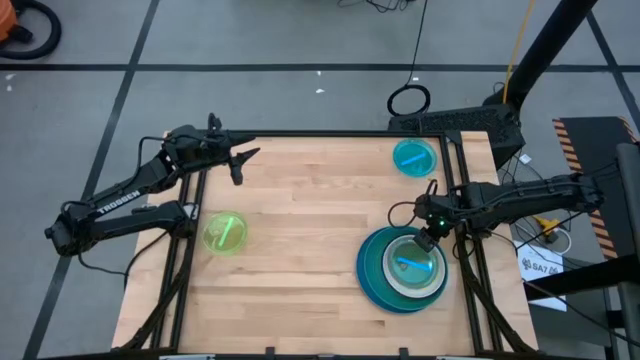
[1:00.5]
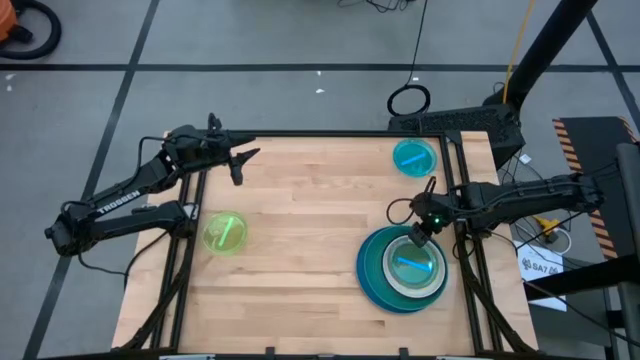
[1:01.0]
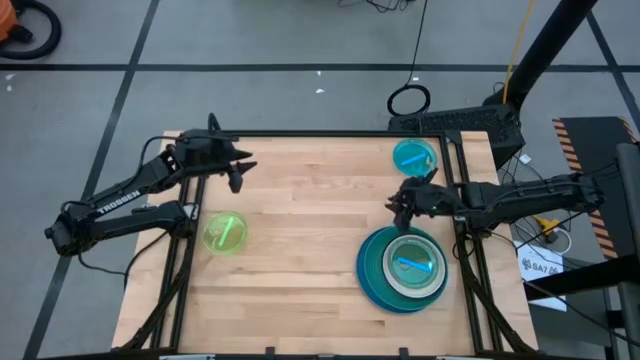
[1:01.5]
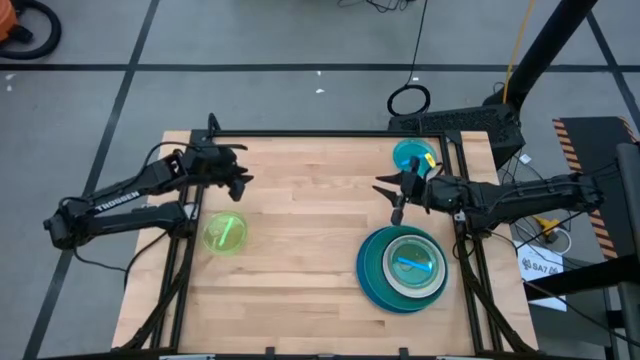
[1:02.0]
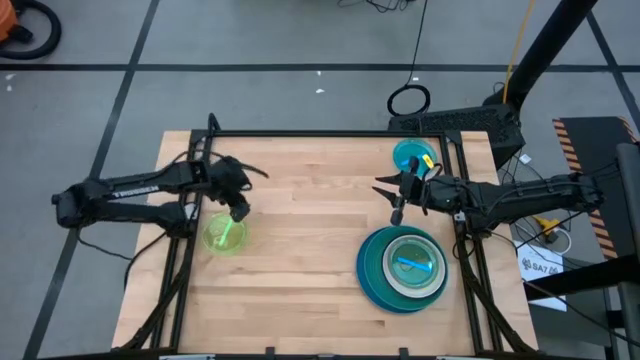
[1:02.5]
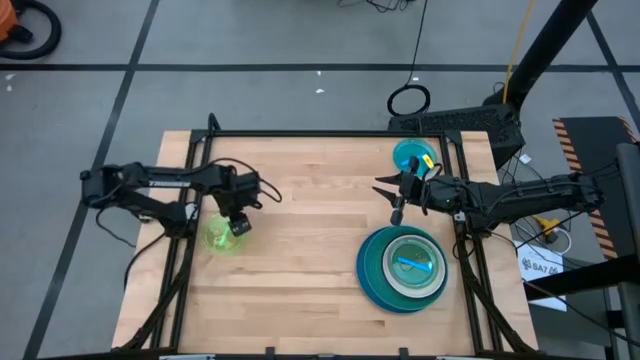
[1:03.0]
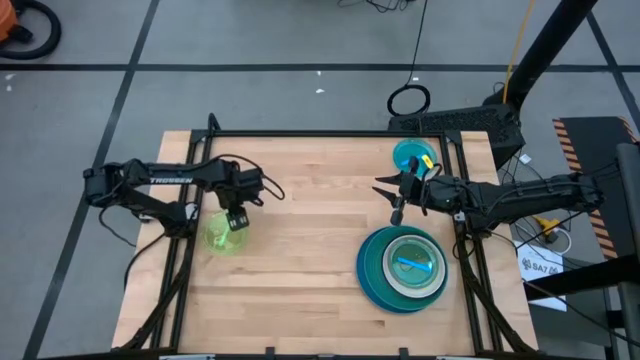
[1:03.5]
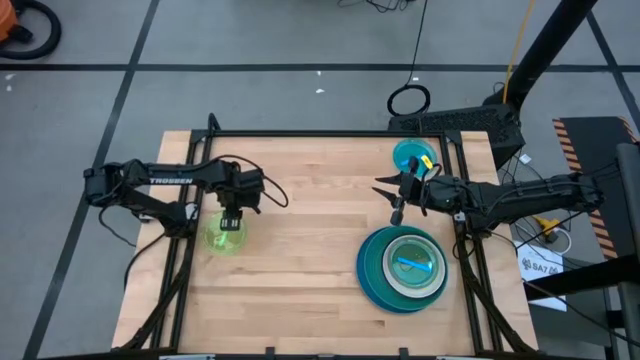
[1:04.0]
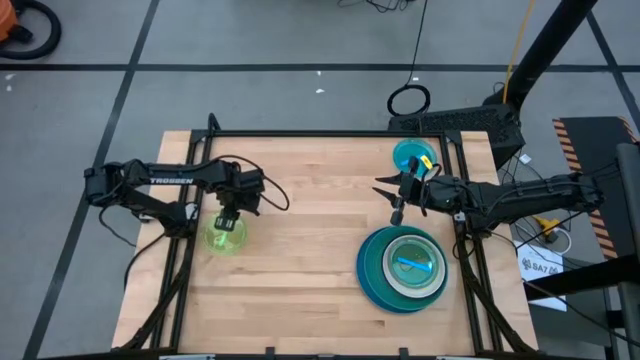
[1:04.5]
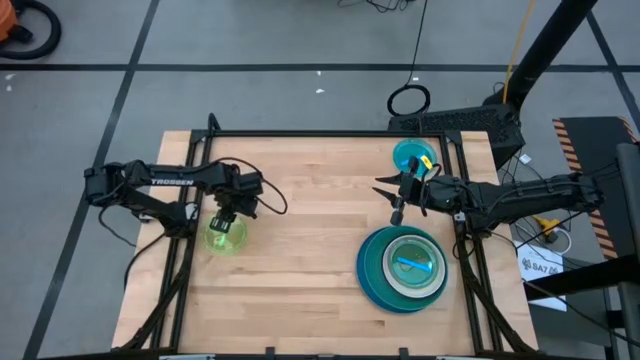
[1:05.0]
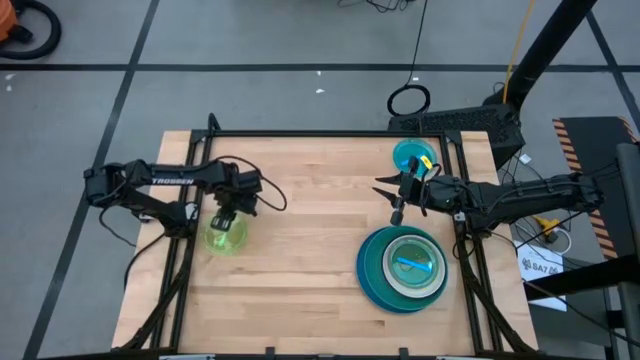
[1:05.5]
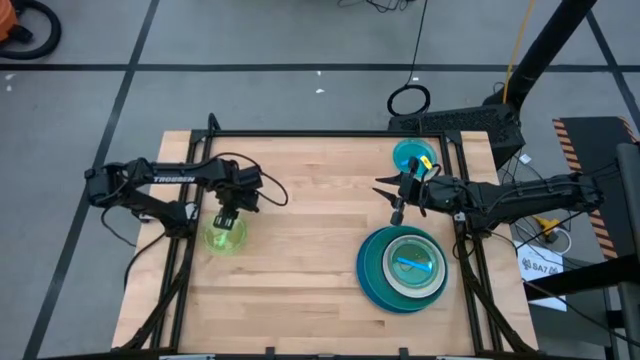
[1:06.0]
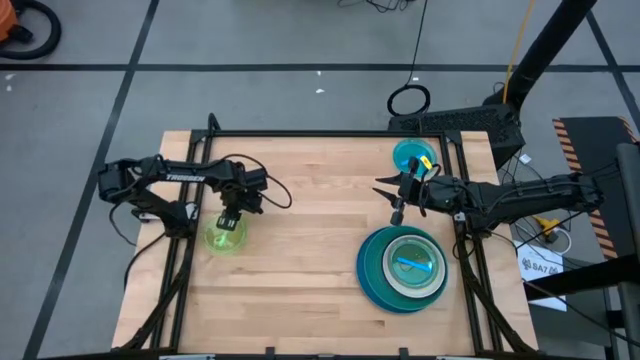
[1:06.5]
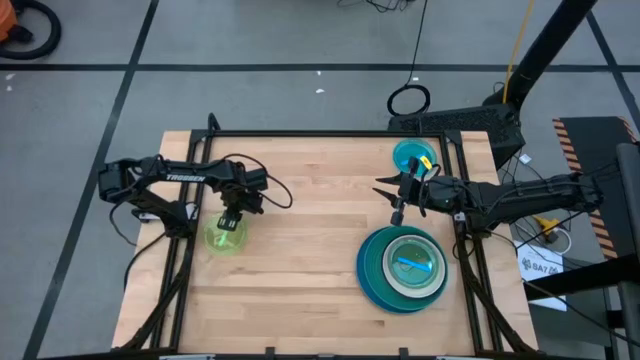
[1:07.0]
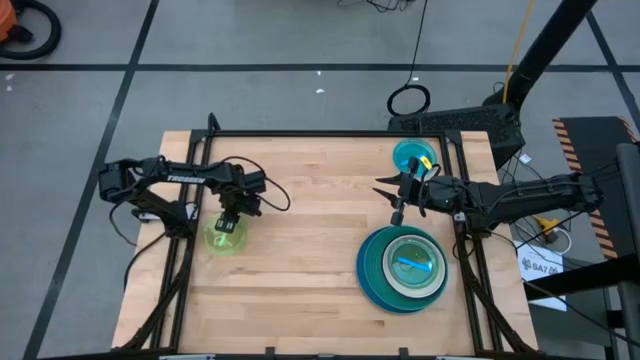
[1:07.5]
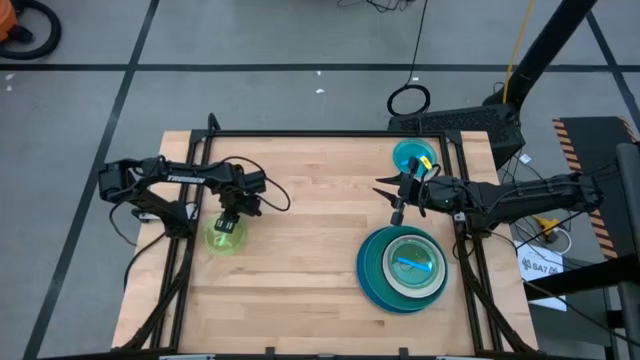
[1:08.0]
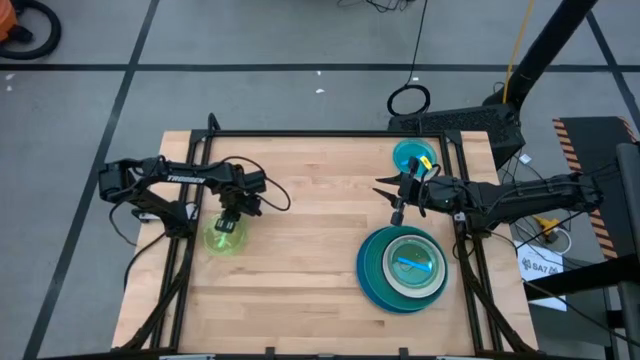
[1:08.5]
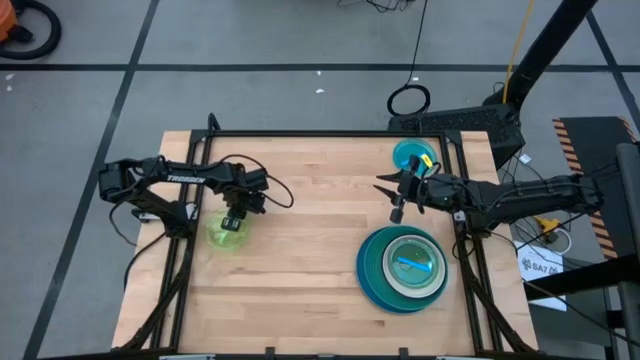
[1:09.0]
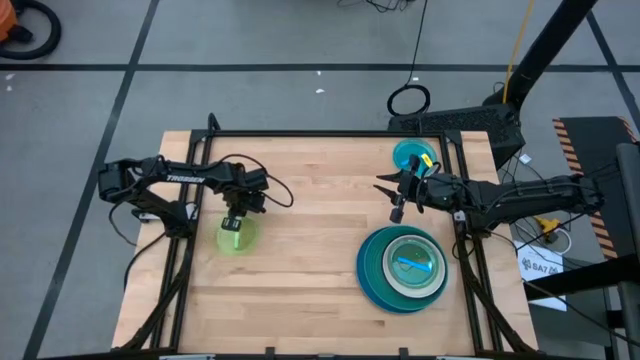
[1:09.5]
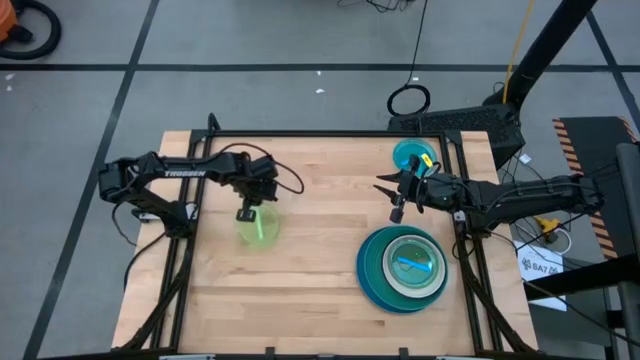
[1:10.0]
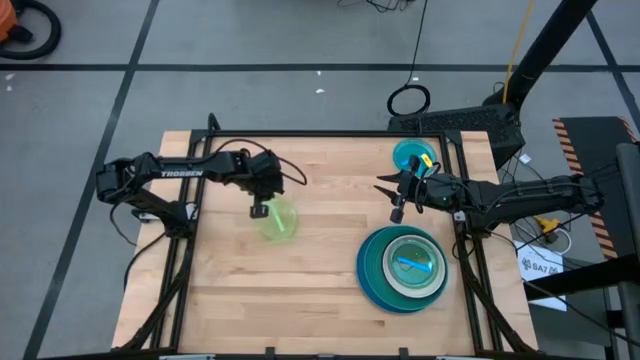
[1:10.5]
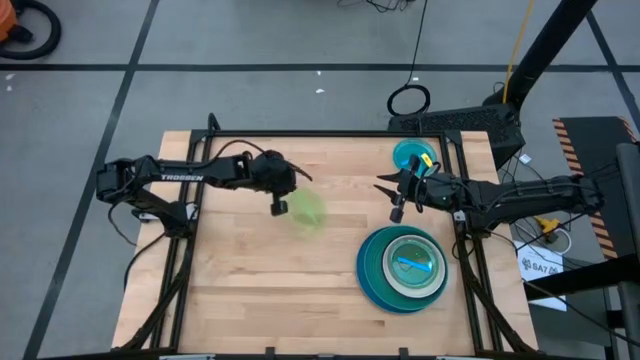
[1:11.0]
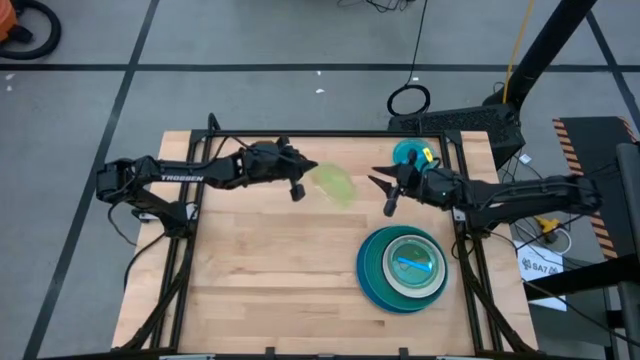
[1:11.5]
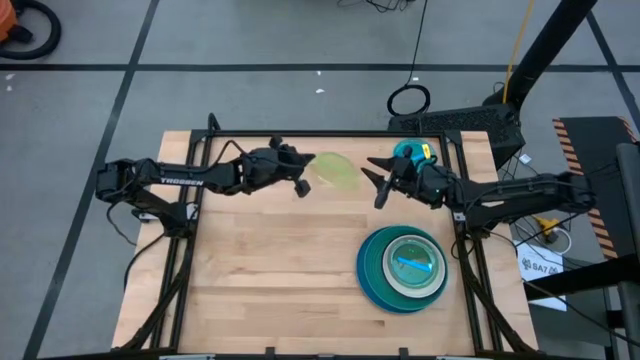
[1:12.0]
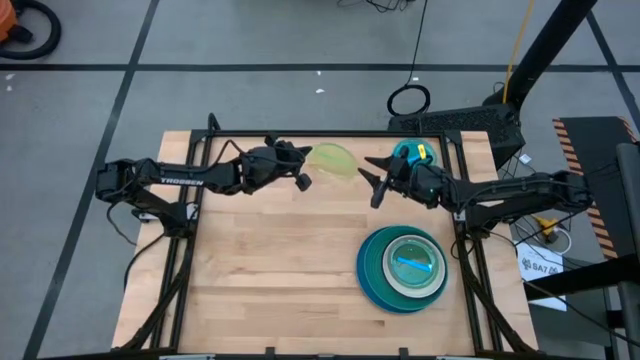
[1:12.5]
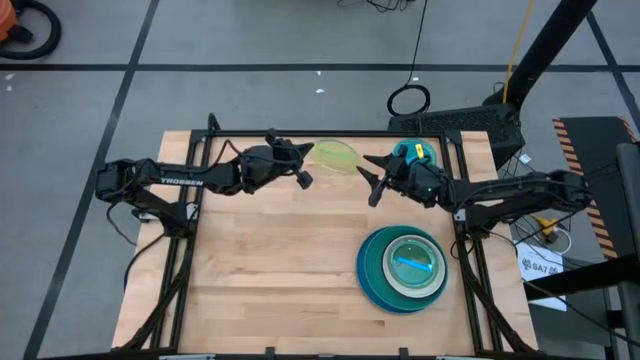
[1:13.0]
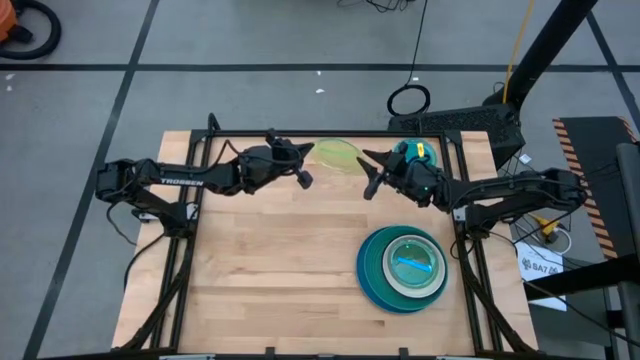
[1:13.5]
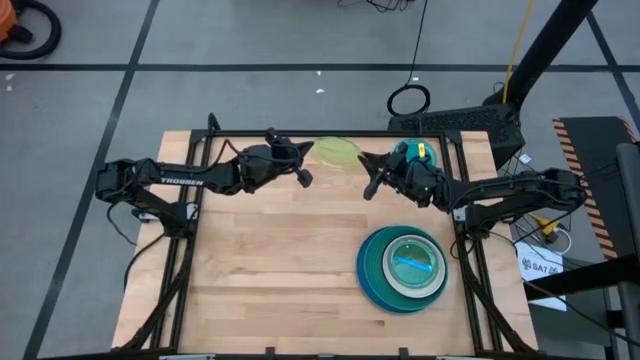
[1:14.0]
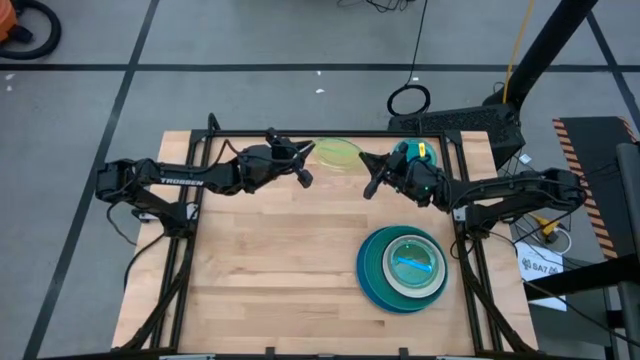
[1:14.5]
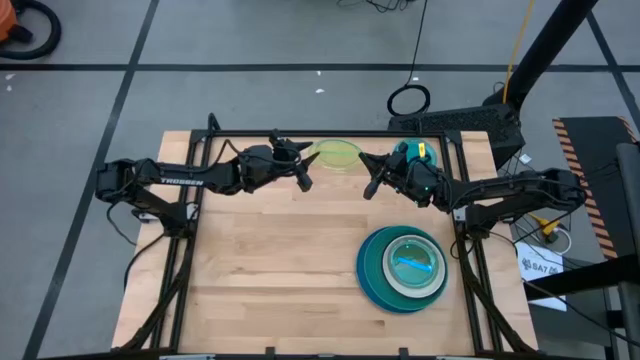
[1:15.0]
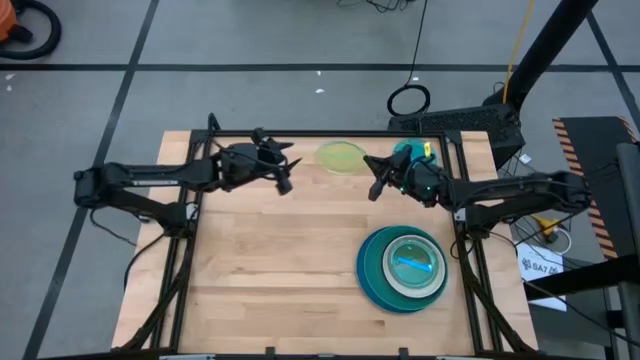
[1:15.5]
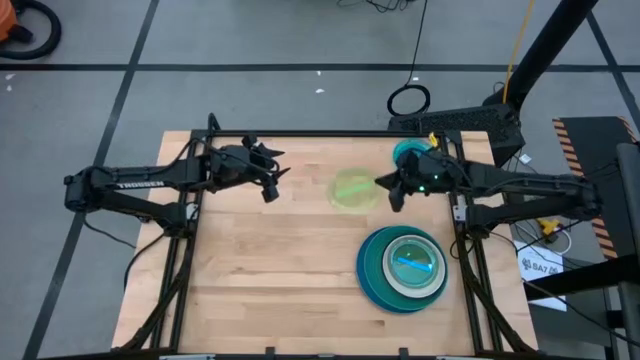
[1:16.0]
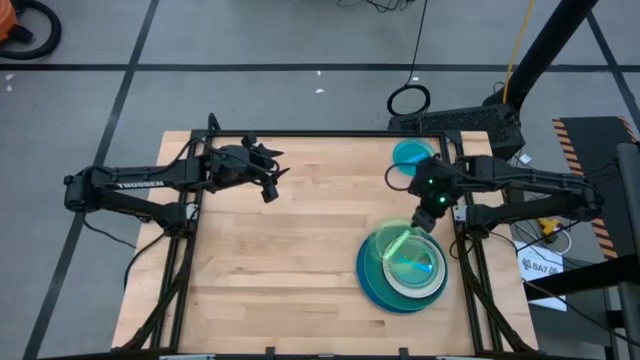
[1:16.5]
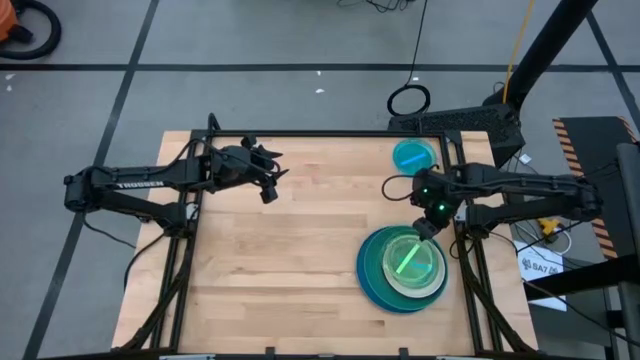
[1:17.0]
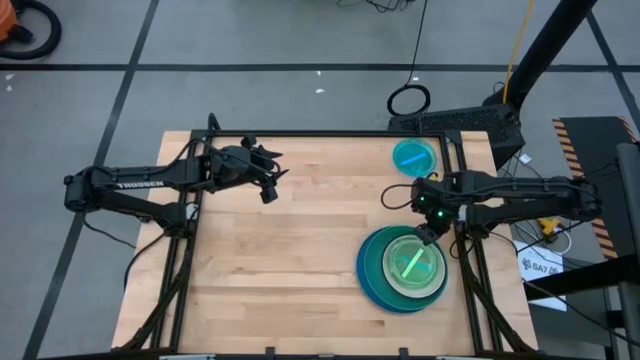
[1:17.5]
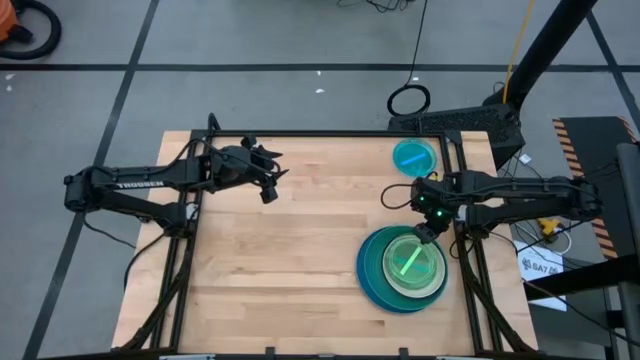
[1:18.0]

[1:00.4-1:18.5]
Task: Stack plastic plates
Stack the light green plate on top of the light blue plate

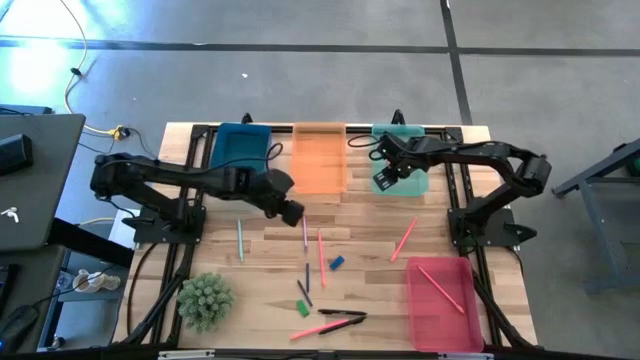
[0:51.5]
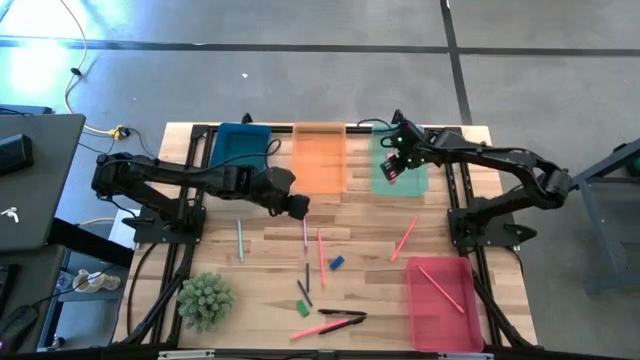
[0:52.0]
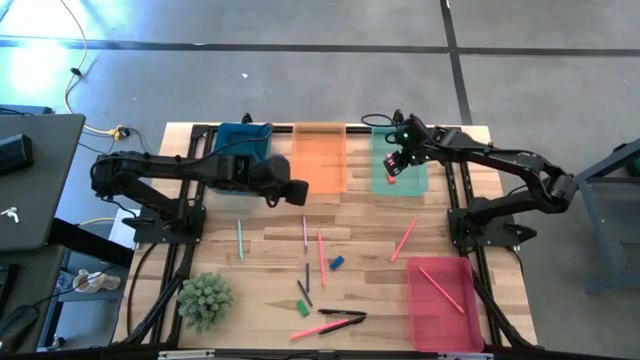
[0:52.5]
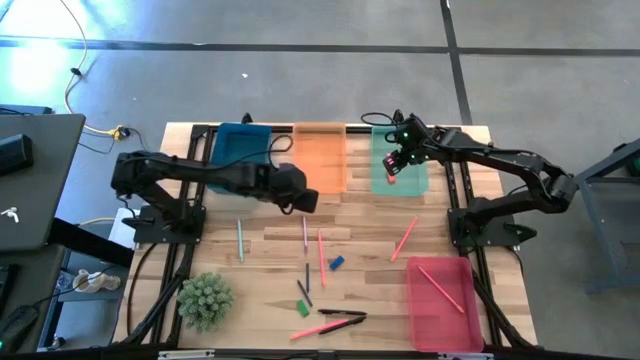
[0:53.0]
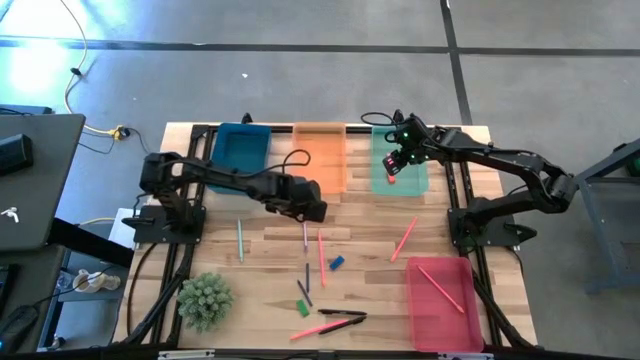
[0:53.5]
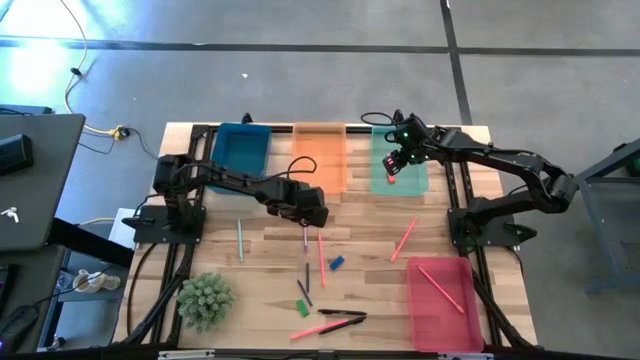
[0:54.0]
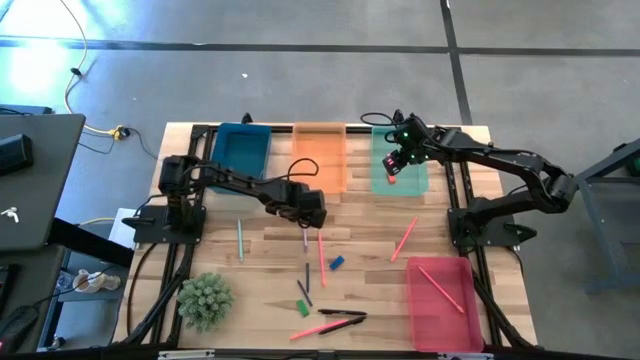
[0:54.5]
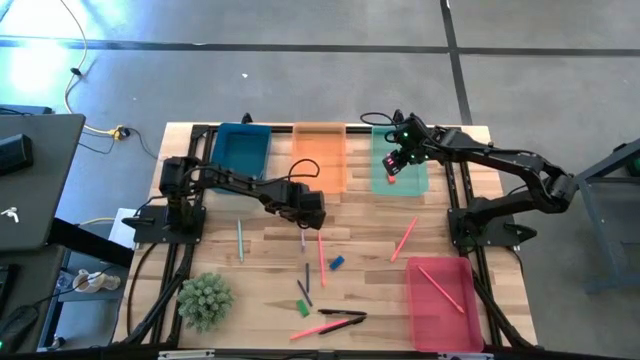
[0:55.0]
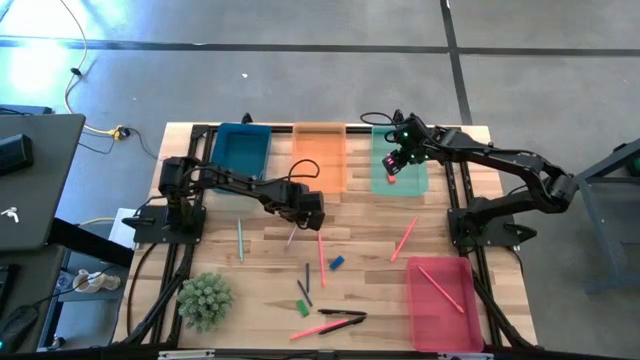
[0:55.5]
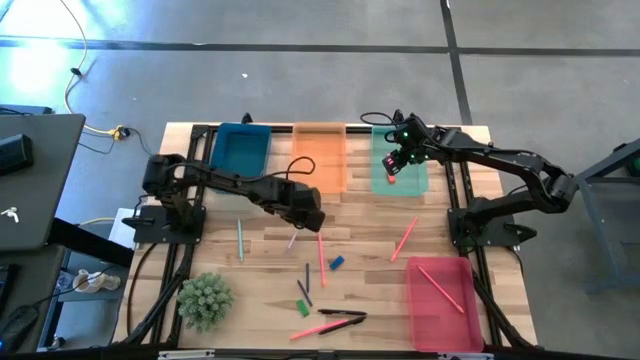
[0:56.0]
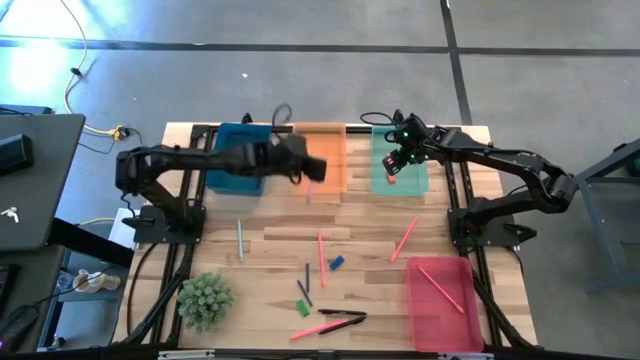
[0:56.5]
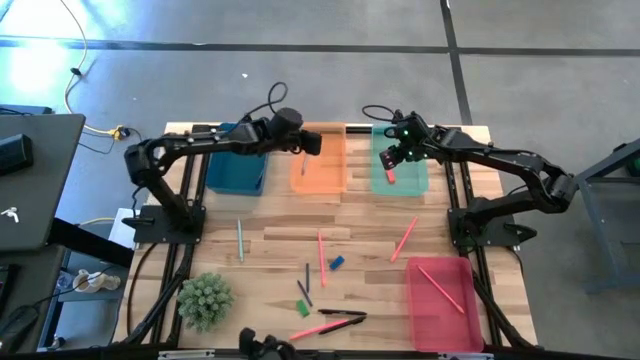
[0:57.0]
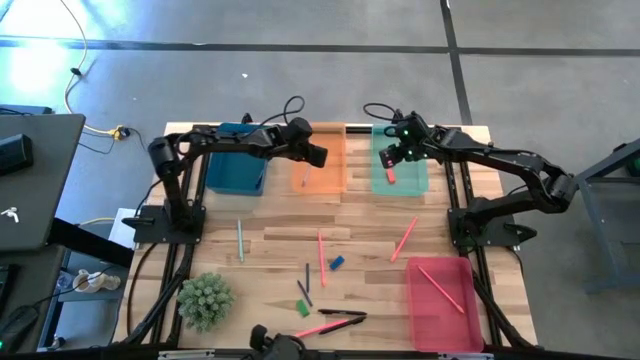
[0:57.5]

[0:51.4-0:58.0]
Task: Sort crayons/erasers/pens/pencils in bins
Put the violet ballpen into the orange bin
